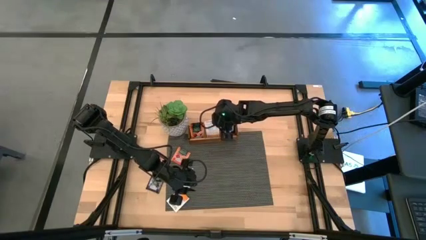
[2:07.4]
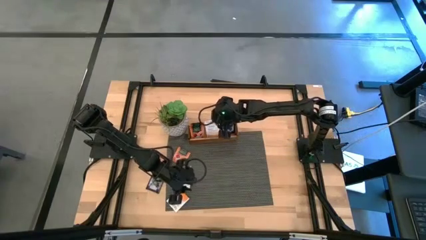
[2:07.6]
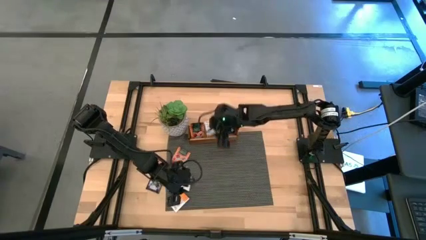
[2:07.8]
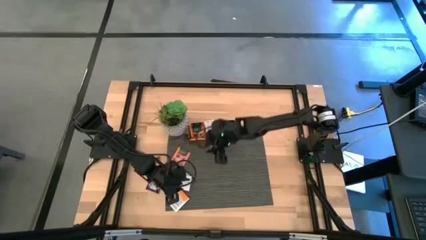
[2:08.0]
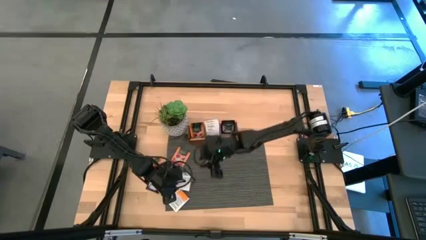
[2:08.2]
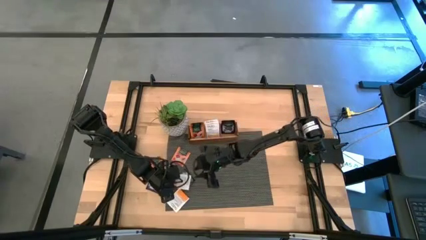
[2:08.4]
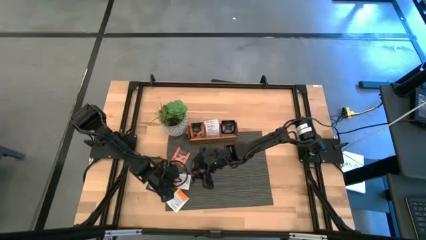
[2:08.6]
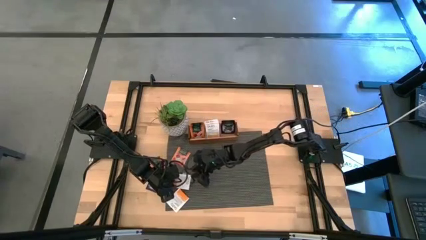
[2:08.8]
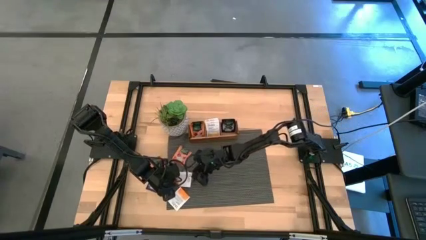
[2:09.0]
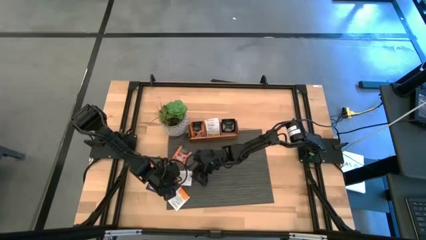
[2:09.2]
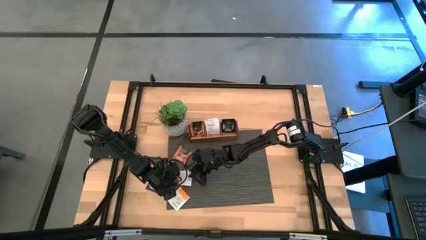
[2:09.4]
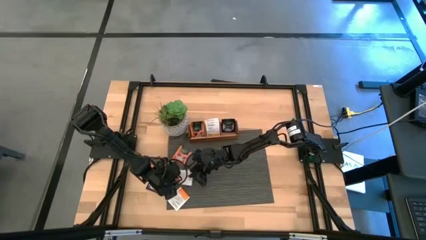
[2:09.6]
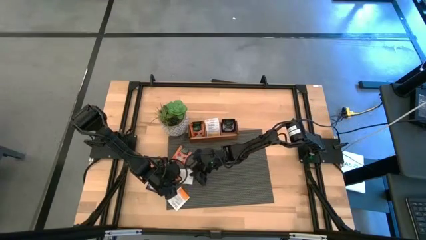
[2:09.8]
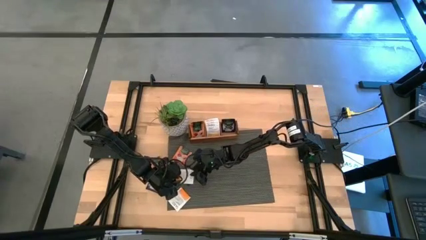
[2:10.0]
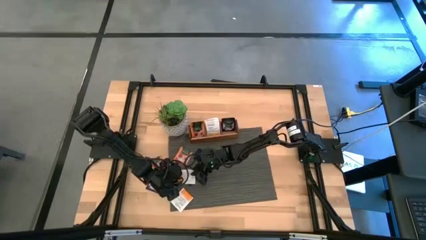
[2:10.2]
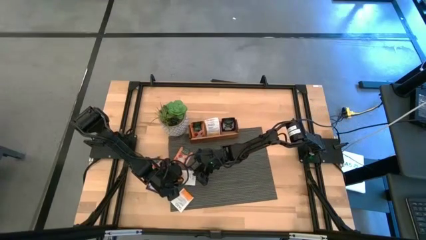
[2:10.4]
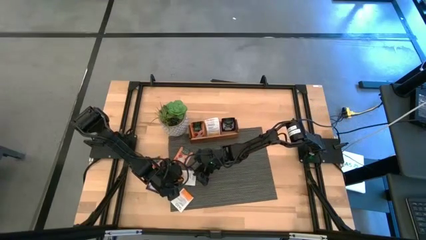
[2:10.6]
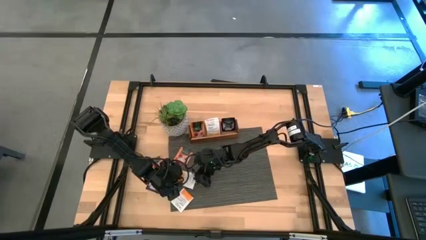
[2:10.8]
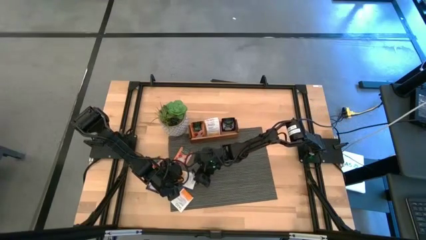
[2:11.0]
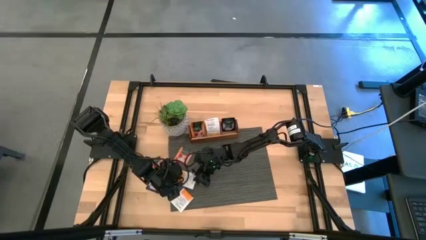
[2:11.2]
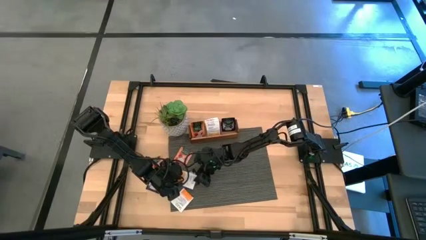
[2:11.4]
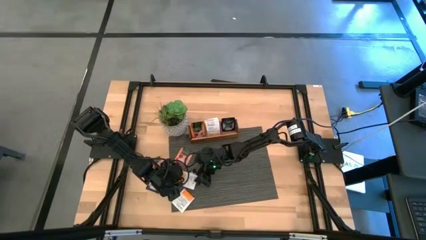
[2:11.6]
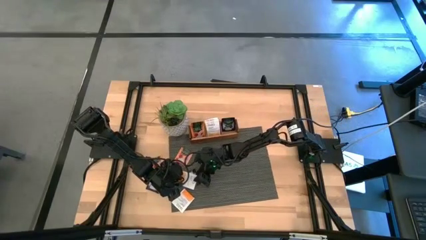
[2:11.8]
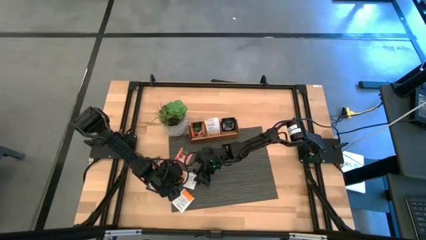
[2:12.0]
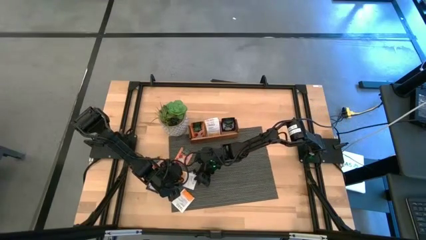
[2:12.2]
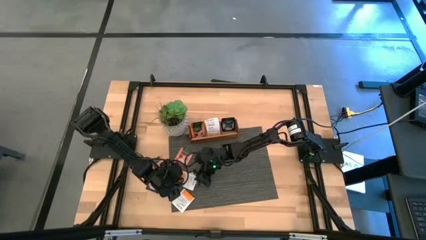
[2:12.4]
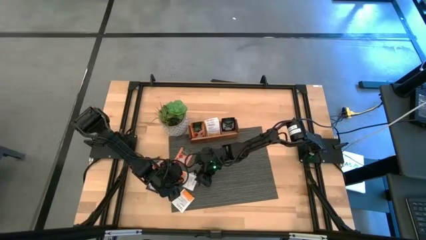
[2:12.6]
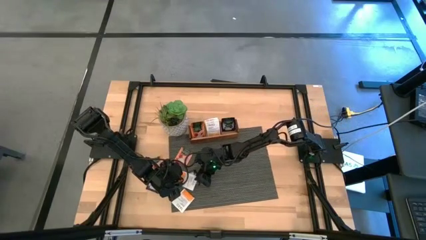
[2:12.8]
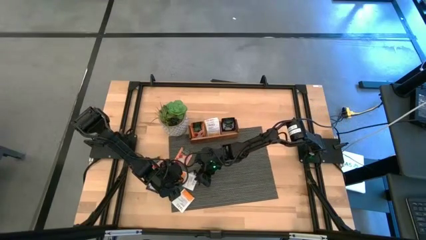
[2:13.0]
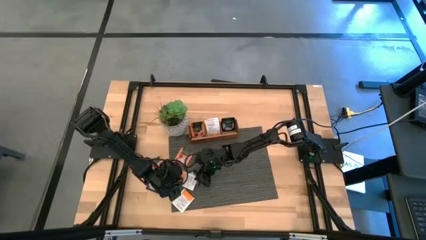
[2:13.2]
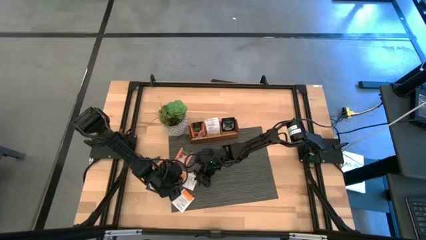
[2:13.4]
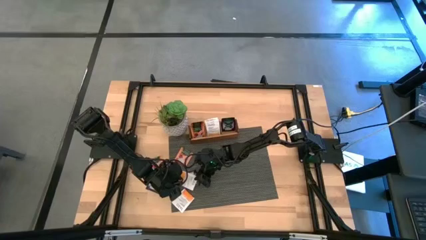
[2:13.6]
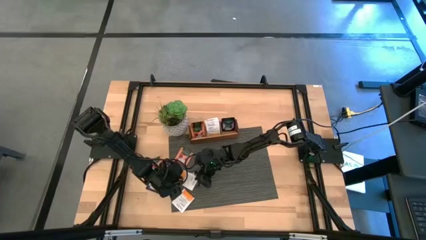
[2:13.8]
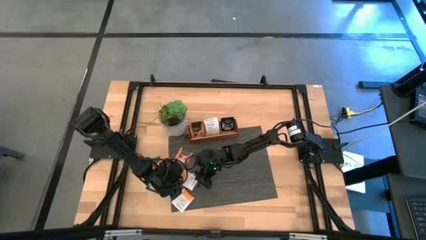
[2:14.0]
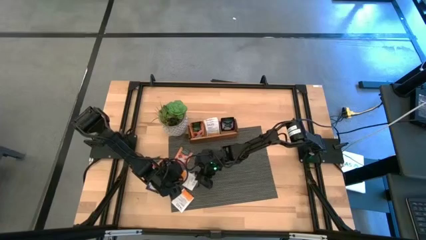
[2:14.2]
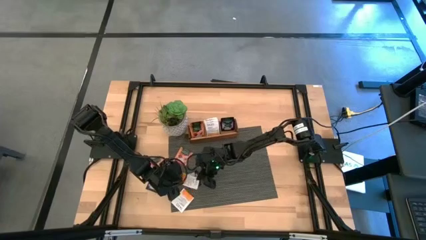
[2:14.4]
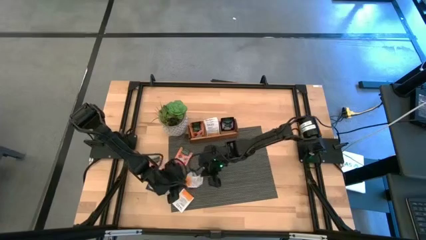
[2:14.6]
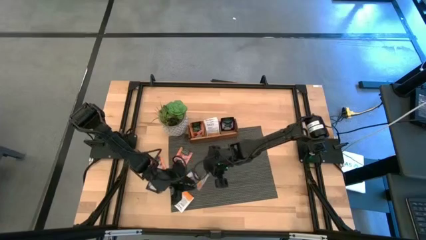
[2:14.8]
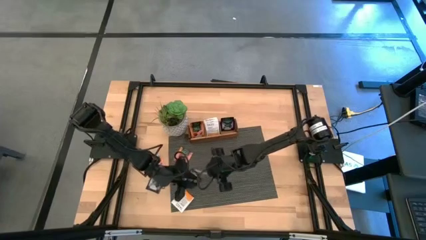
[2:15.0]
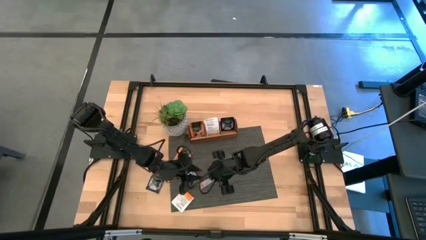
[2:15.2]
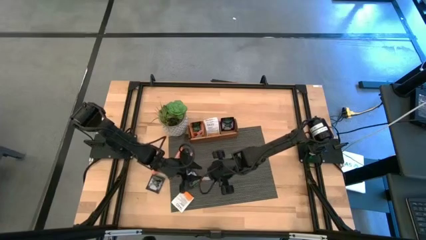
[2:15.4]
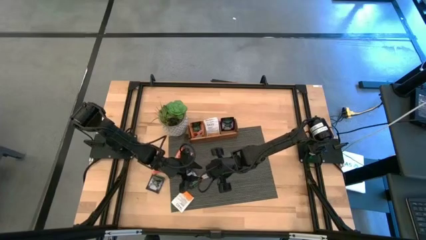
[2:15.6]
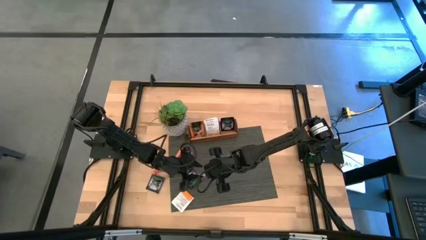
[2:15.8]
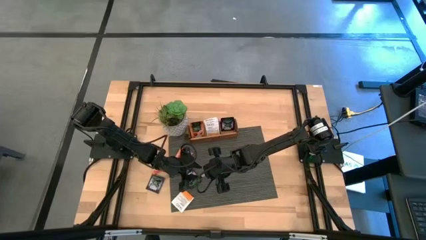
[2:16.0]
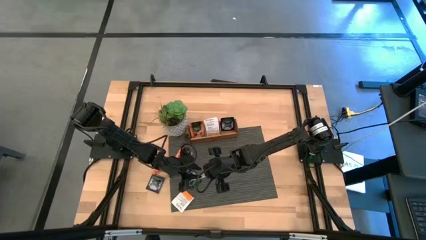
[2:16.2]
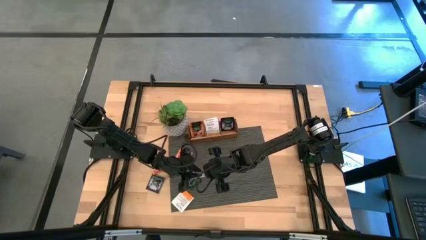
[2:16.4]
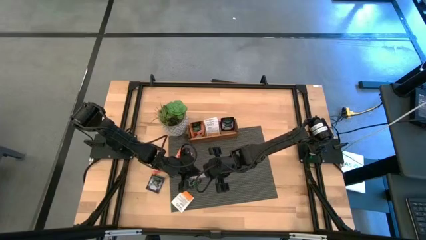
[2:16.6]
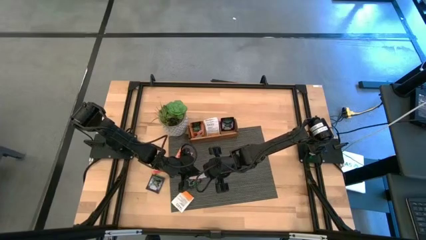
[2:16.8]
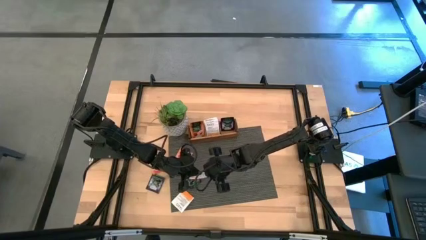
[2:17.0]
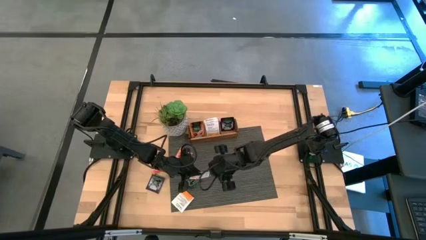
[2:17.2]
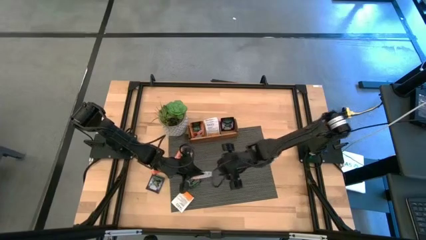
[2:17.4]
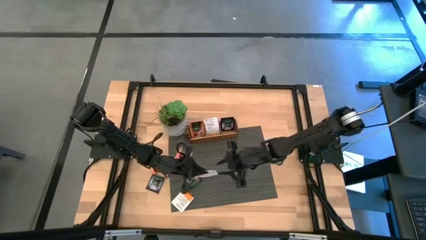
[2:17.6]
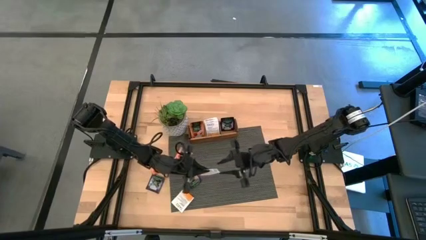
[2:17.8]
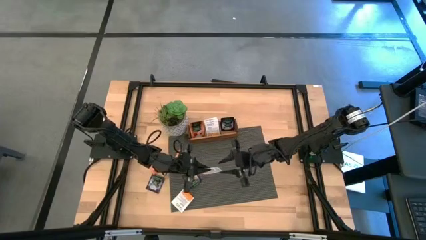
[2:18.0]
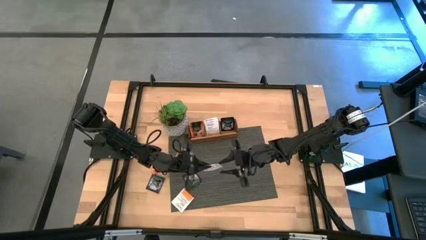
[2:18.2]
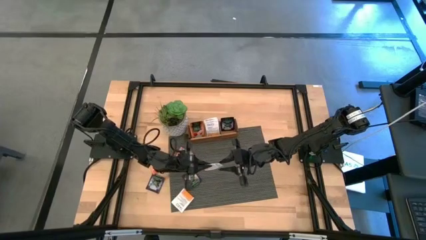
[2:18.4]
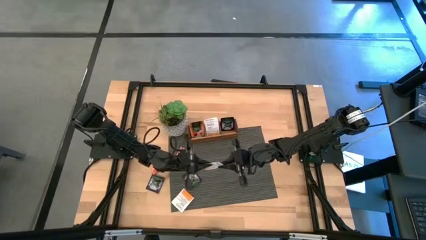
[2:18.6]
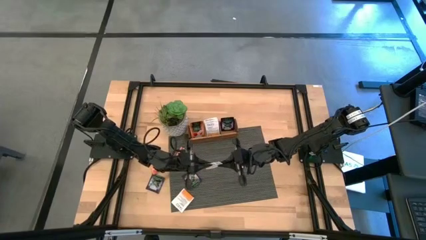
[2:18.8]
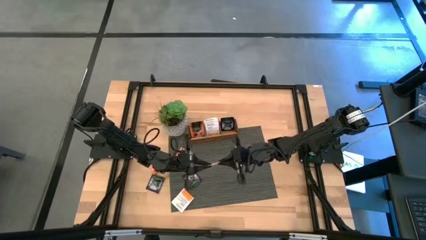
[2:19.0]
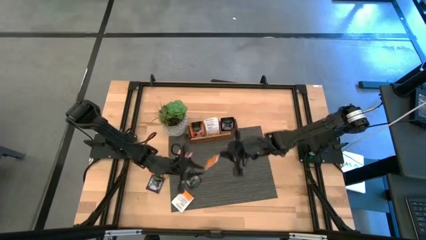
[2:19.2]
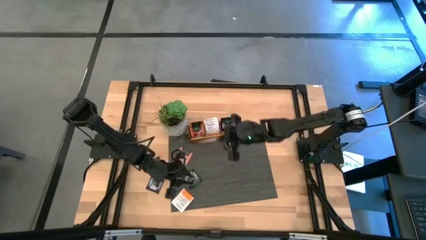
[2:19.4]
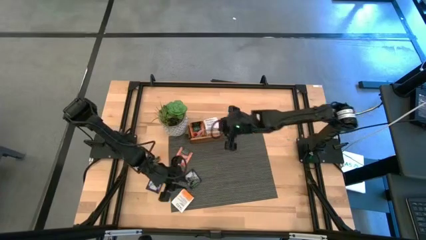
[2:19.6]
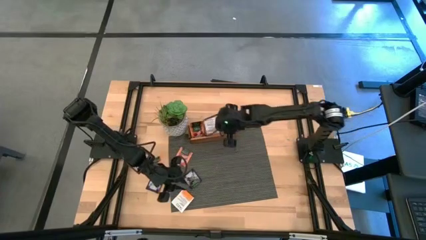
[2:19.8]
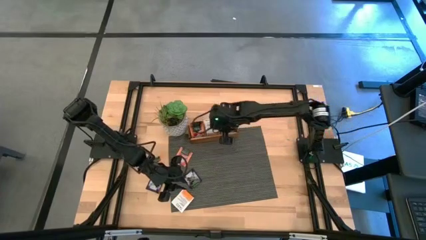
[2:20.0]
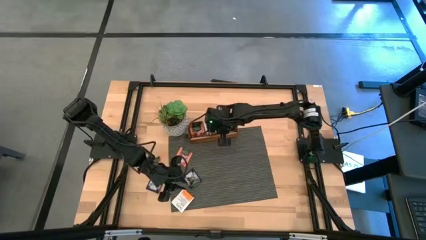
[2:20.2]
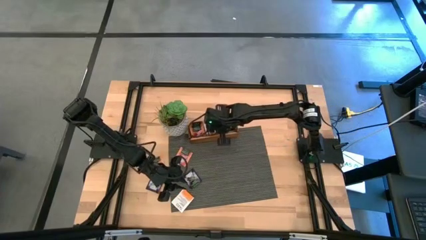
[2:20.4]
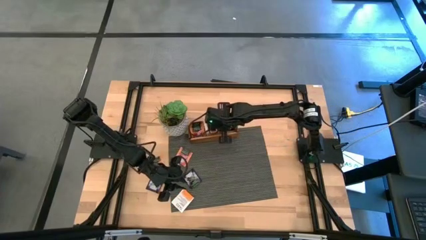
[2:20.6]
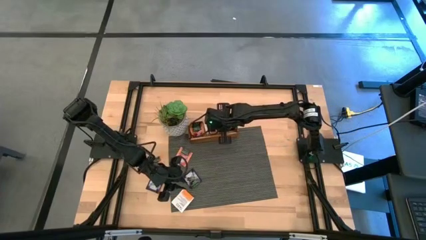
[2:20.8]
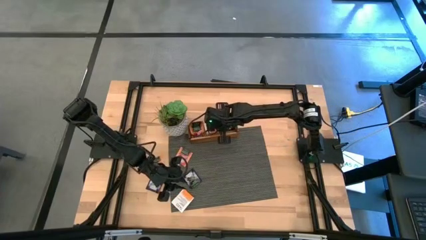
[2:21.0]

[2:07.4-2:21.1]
Task: Pick & Place Tea
Put the top white tea bag into the middle slot of the wooden organizer

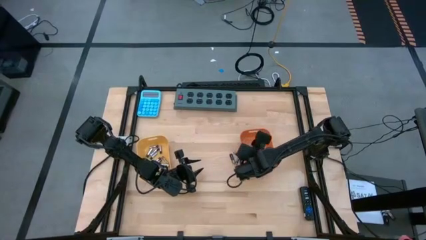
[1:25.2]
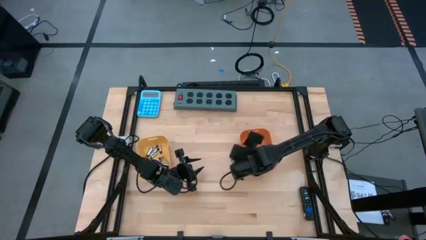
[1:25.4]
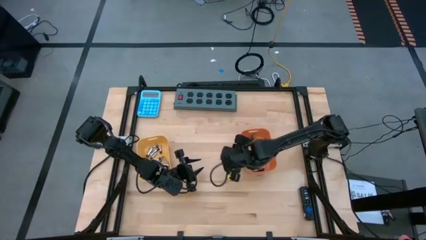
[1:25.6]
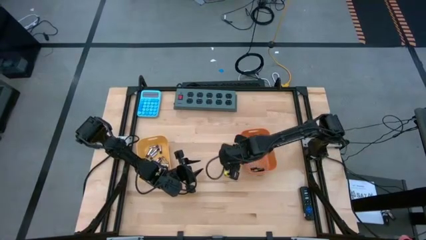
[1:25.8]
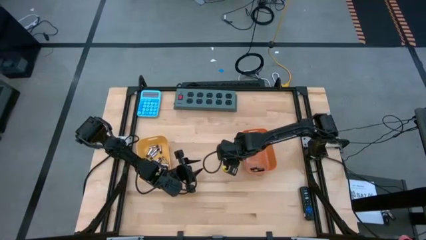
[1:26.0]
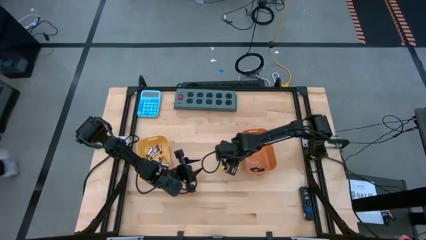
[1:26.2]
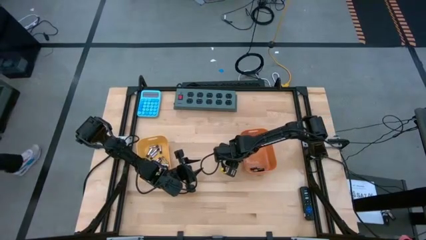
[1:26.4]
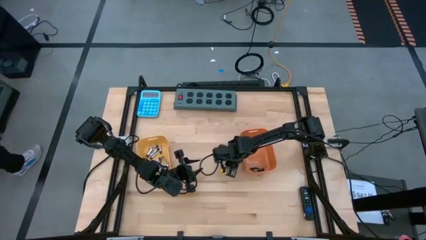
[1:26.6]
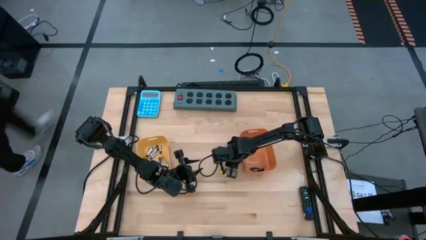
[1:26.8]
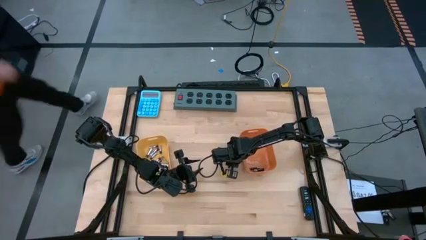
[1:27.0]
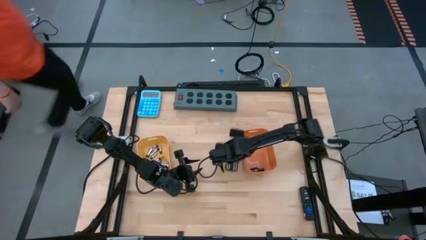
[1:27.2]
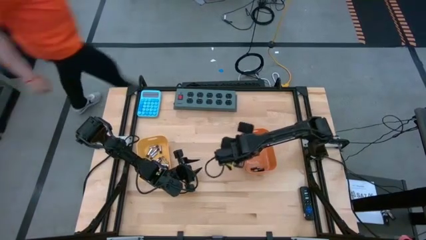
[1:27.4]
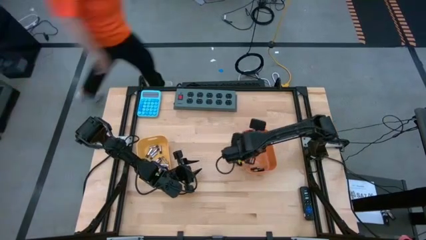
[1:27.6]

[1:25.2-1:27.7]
Task: Sort batteries
Put the black battery into the orange bin

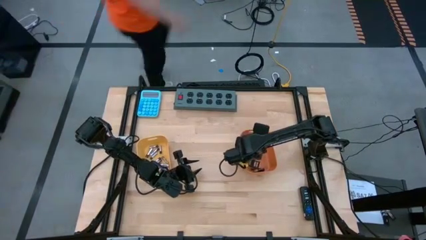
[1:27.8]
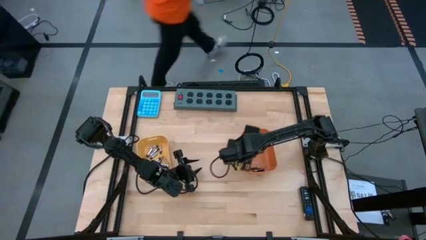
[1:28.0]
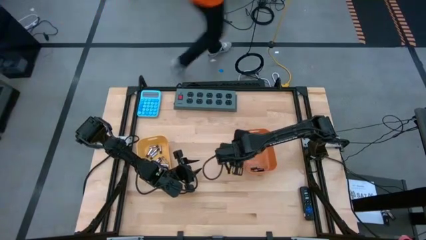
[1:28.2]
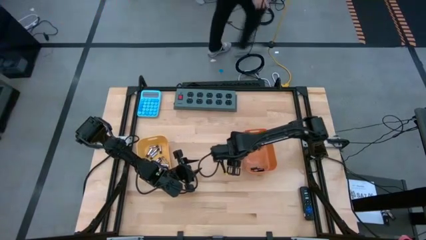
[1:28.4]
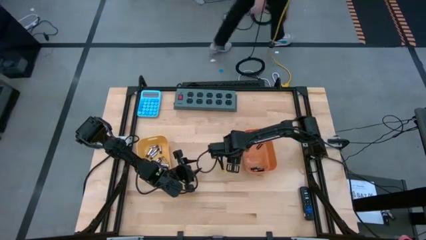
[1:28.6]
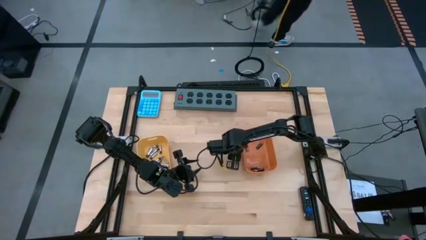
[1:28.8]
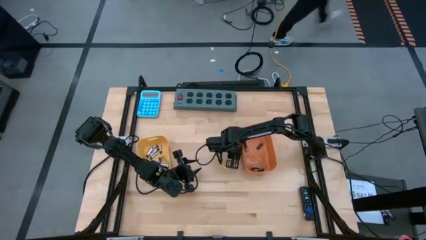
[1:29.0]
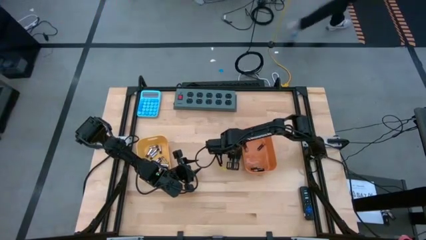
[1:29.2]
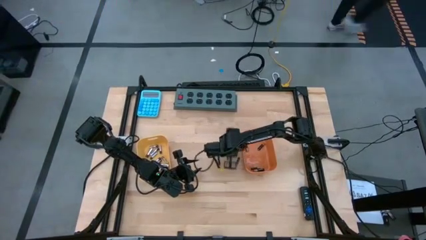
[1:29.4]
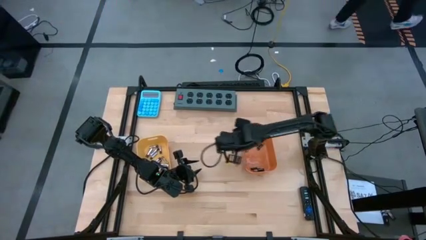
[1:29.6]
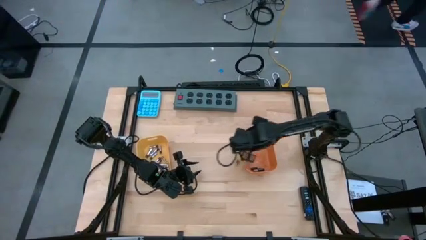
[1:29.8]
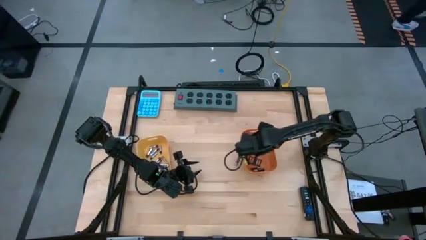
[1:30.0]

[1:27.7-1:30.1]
Put the black battery into the orange bin
